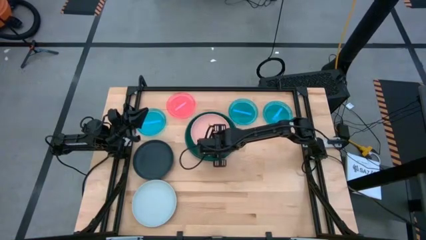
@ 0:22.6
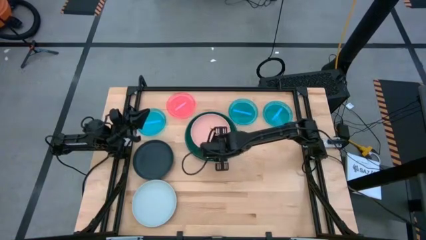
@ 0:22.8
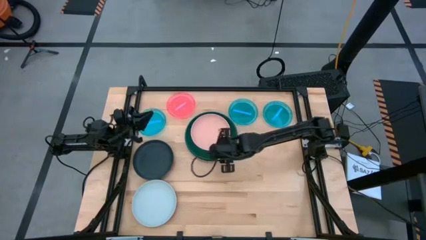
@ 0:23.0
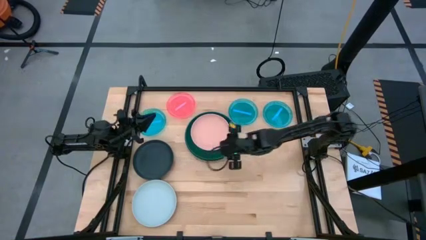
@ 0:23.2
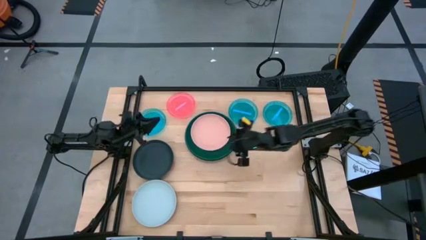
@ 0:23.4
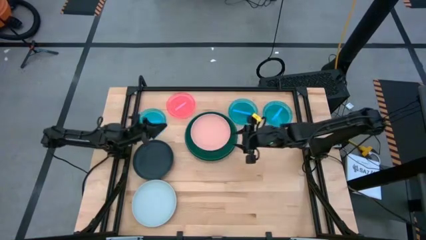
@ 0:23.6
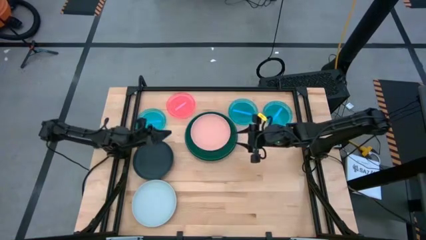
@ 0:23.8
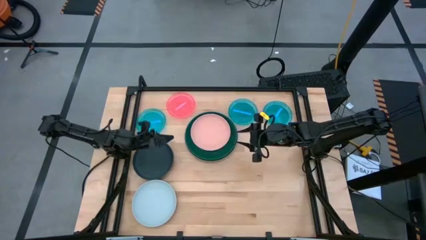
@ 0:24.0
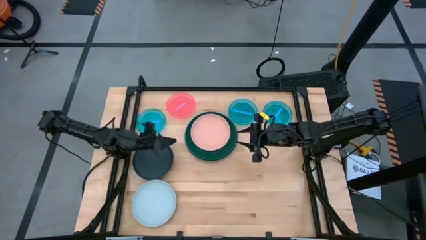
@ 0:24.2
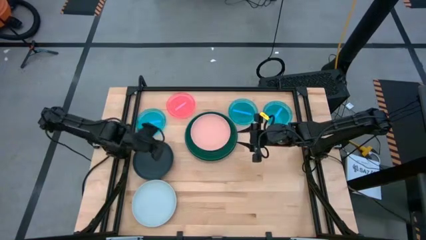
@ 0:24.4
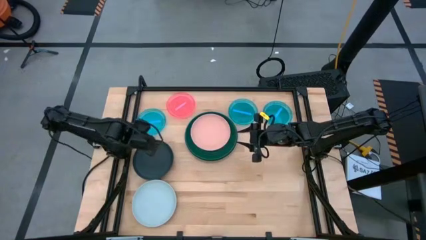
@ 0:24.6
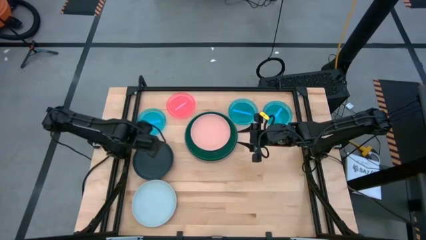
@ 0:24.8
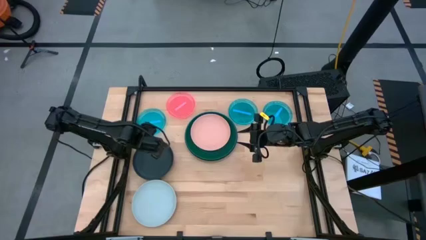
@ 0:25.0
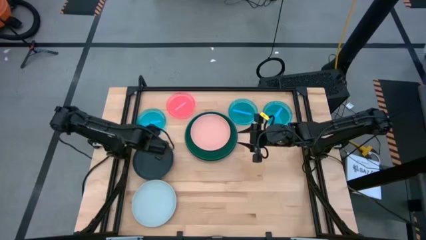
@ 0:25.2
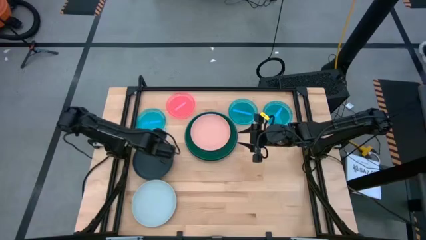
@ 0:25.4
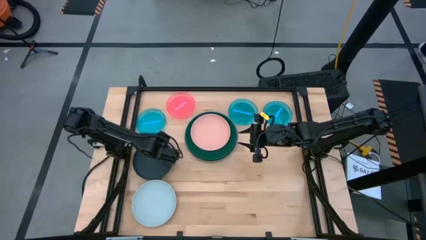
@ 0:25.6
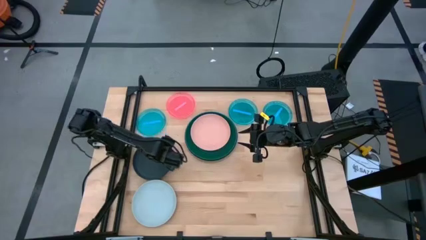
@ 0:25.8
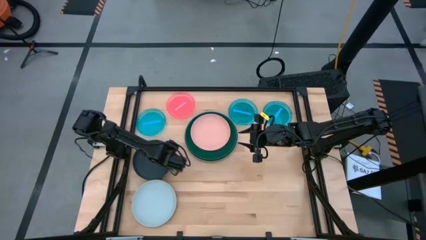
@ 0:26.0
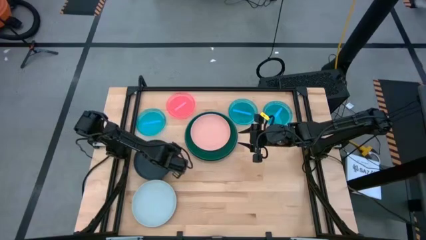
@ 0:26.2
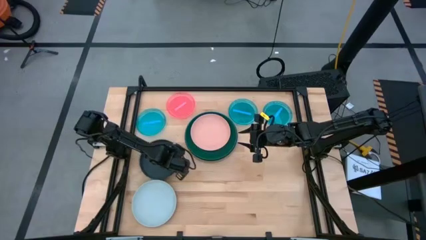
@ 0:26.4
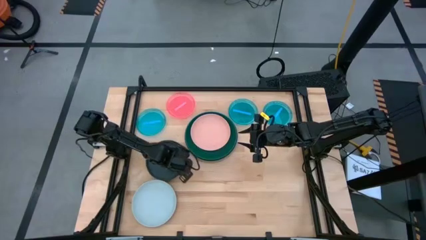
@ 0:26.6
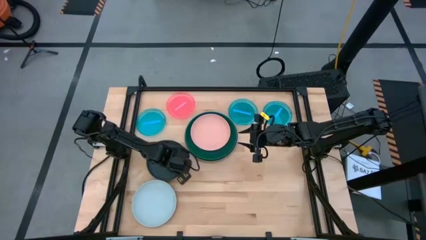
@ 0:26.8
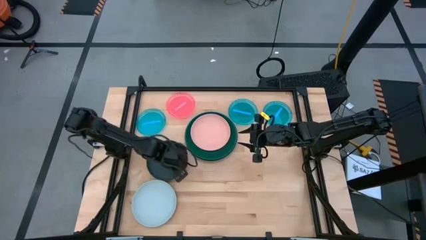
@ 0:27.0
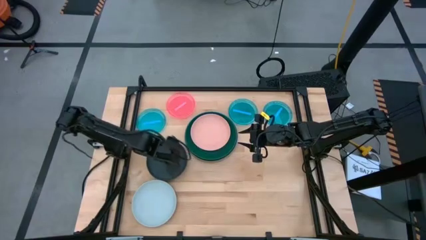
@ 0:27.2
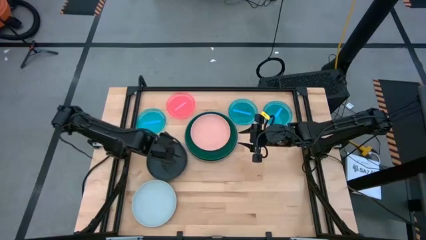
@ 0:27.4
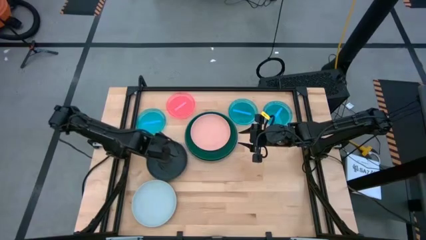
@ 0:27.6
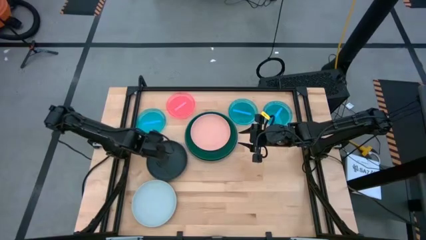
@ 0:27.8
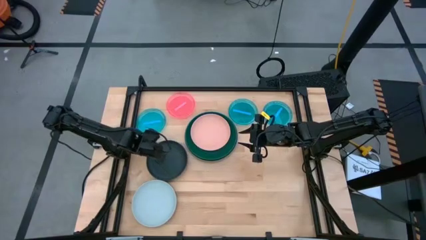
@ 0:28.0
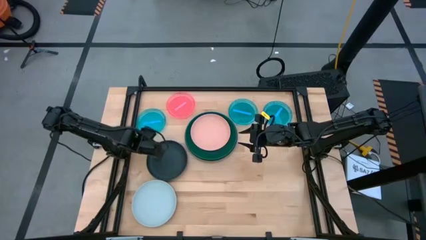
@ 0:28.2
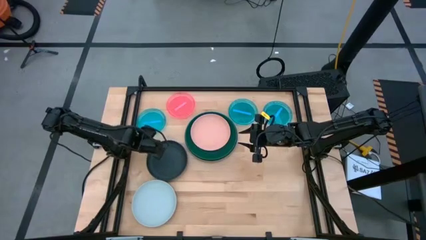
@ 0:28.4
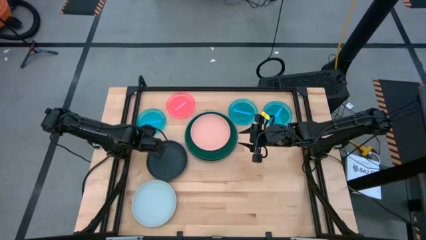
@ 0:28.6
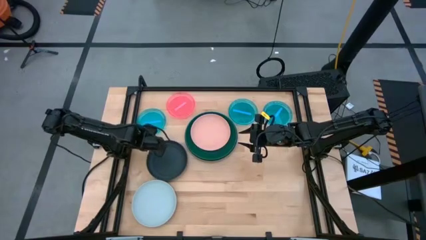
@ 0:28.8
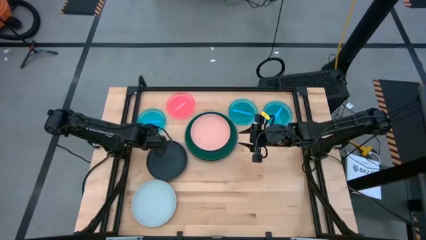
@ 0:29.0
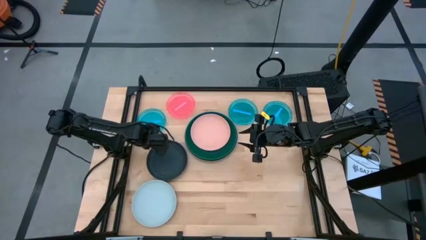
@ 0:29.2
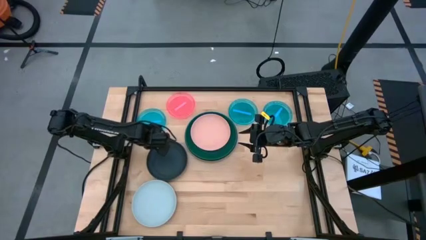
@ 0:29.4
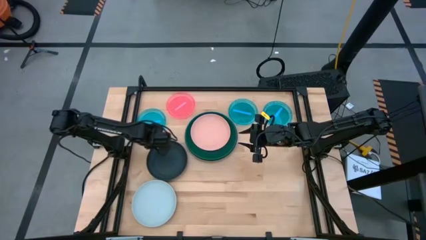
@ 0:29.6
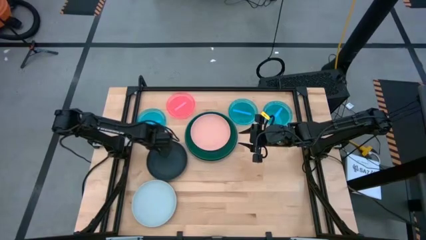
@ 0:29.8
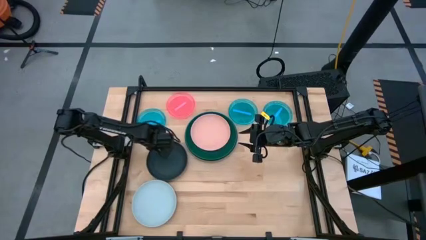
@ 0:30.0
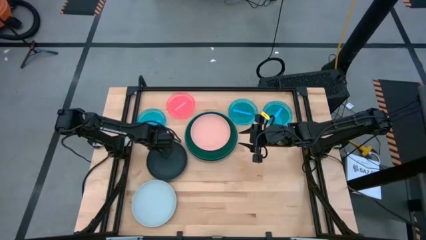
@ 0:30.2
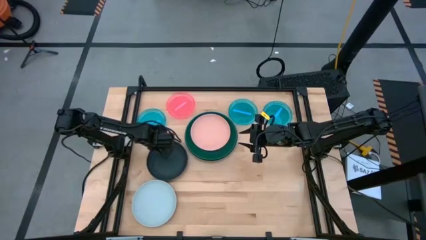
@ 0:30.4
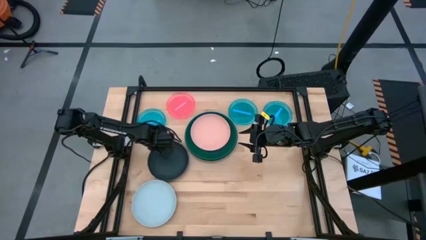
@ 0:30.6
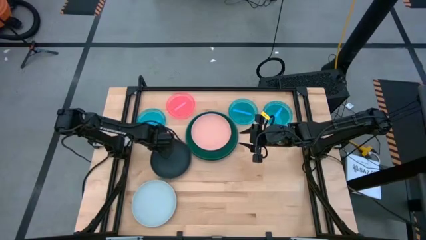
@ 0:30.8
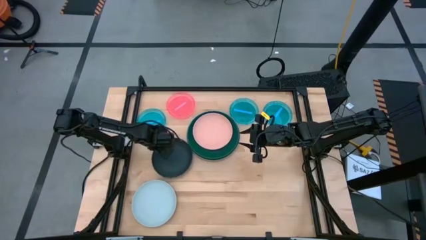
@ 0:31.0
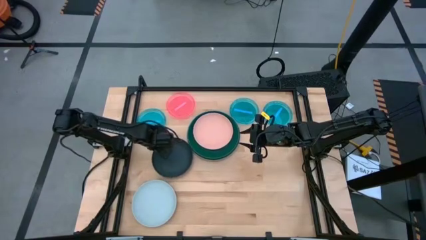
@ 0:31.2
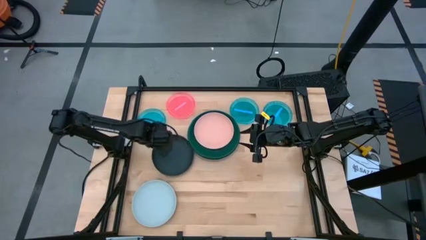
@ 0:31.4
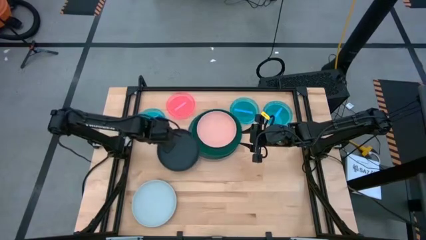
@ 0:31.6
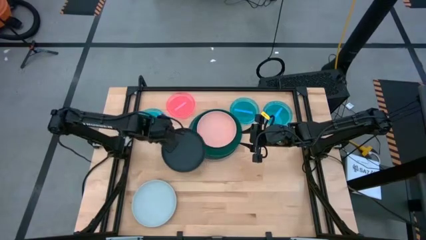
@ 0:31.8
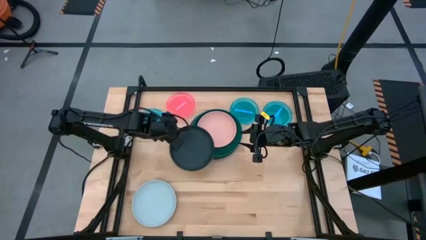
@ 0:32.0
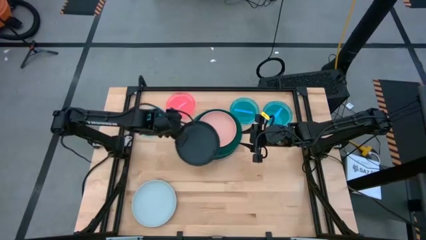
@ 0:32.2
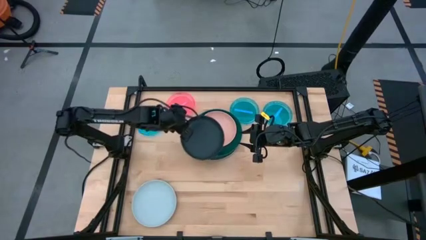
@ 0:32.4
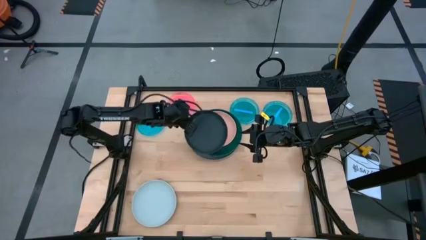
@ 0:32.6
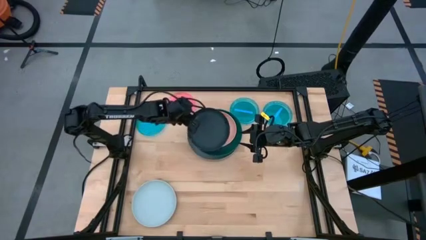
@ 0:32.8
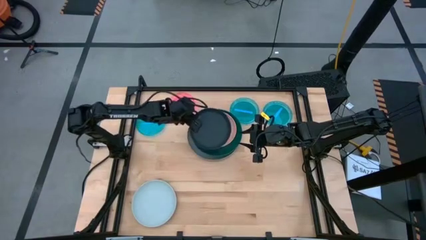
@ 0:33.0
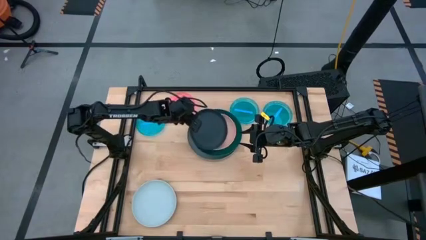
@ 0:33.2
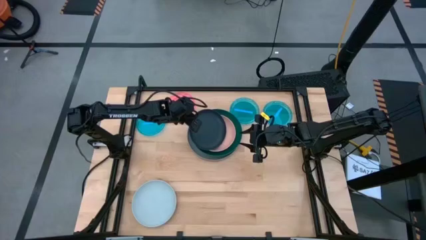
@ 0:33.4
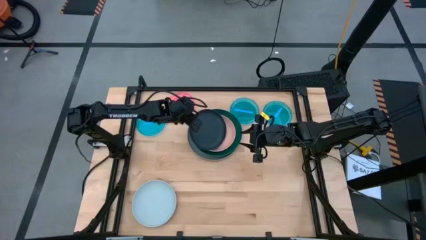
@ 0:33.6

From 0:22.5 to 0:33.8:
Task: Stack plastic plates
Stack the black plate on top of the pink plate

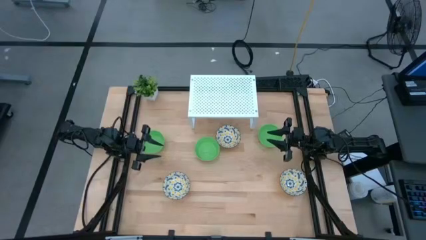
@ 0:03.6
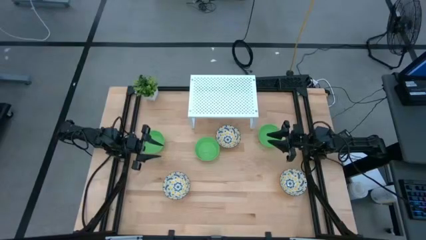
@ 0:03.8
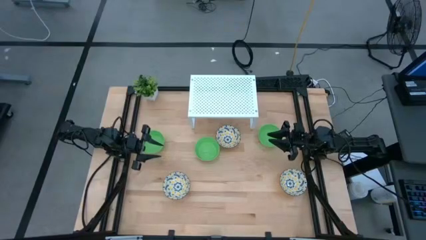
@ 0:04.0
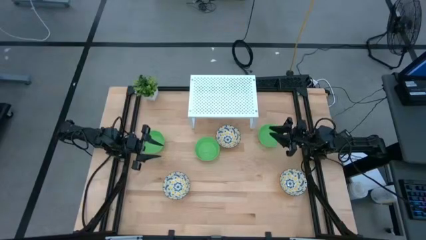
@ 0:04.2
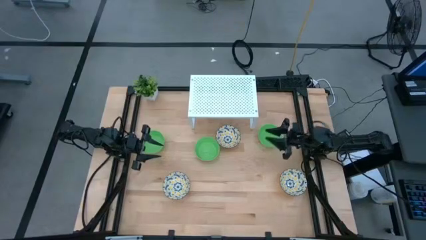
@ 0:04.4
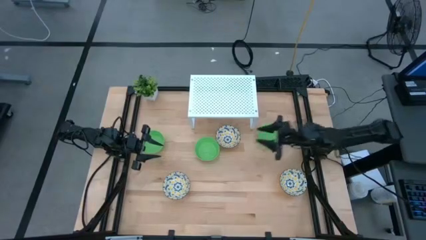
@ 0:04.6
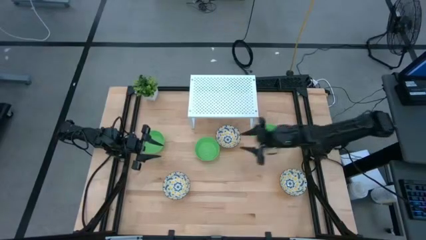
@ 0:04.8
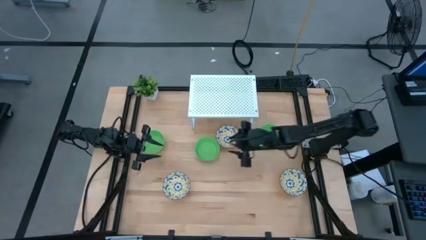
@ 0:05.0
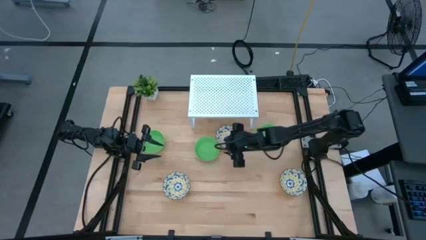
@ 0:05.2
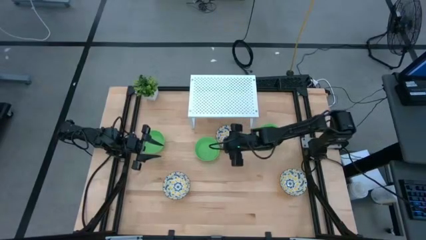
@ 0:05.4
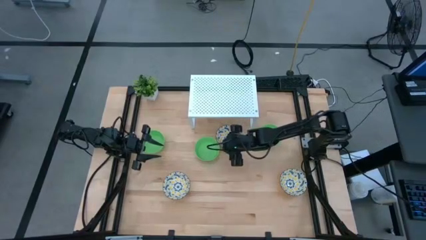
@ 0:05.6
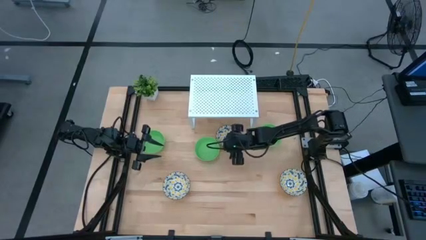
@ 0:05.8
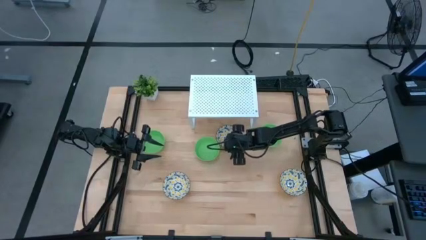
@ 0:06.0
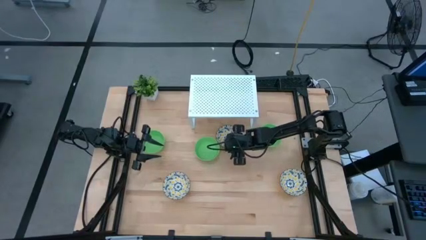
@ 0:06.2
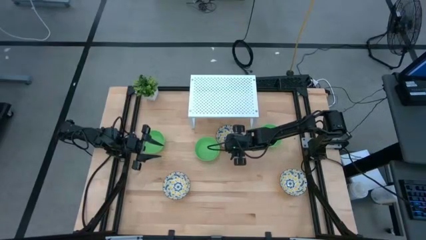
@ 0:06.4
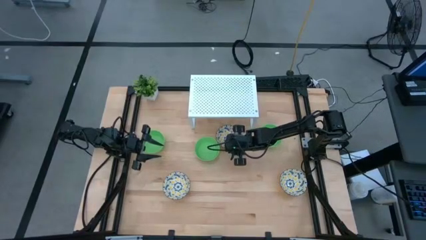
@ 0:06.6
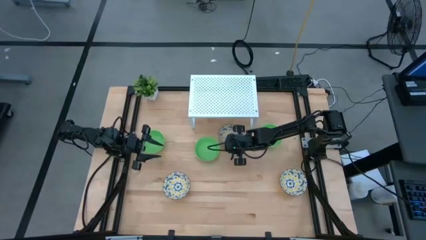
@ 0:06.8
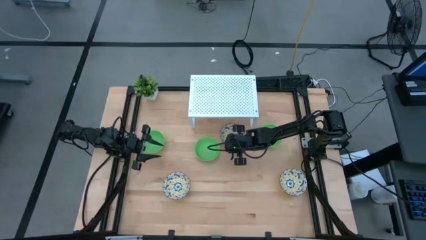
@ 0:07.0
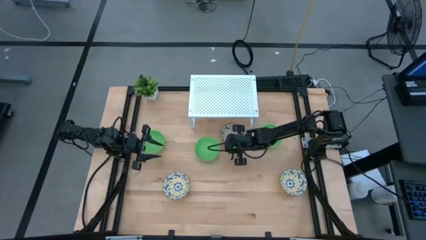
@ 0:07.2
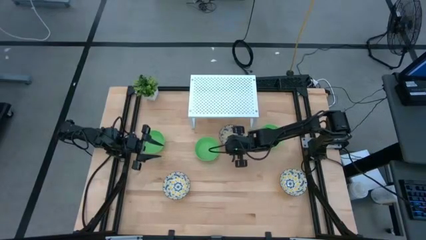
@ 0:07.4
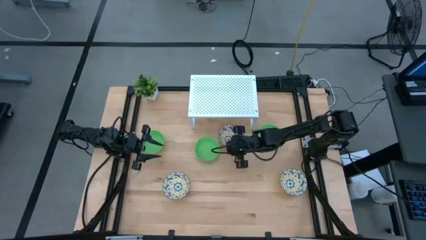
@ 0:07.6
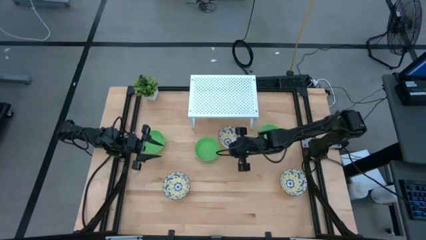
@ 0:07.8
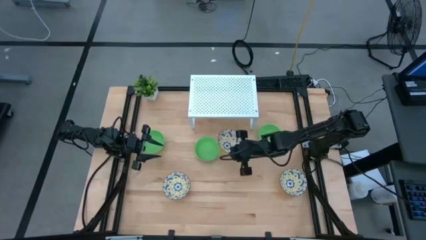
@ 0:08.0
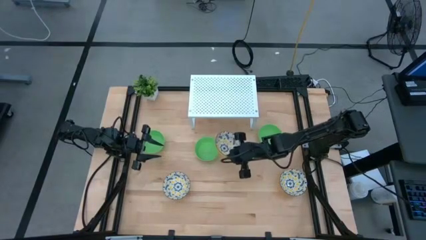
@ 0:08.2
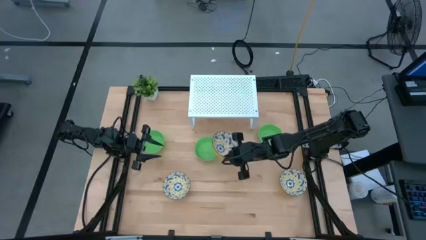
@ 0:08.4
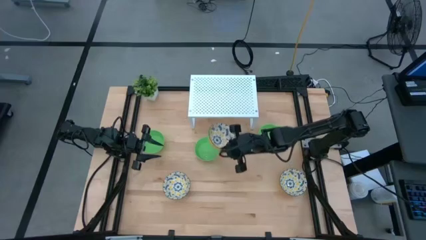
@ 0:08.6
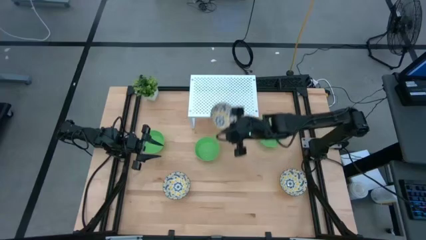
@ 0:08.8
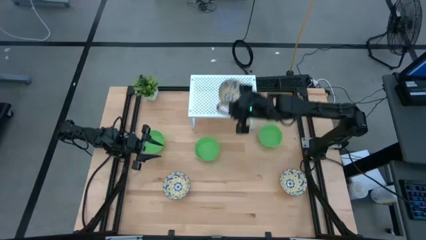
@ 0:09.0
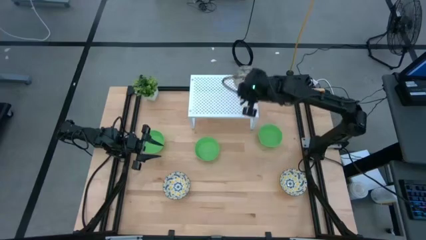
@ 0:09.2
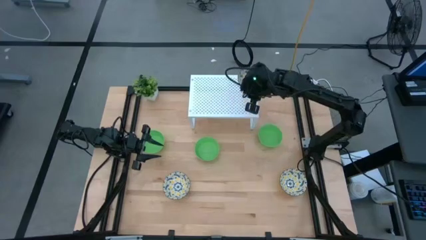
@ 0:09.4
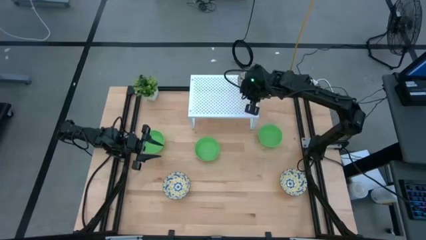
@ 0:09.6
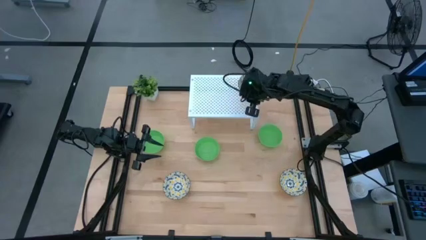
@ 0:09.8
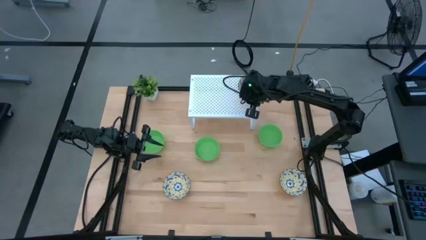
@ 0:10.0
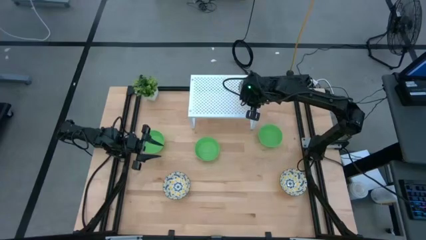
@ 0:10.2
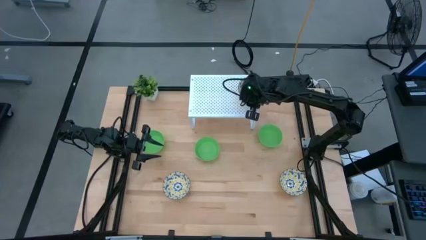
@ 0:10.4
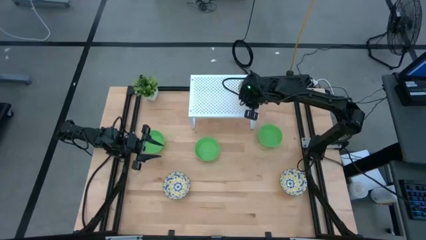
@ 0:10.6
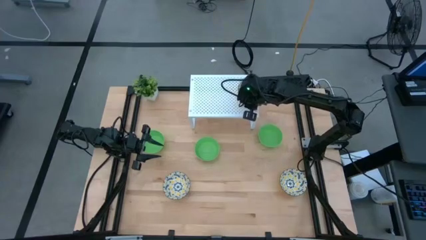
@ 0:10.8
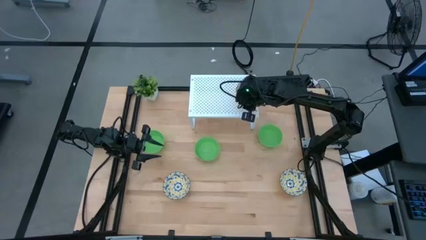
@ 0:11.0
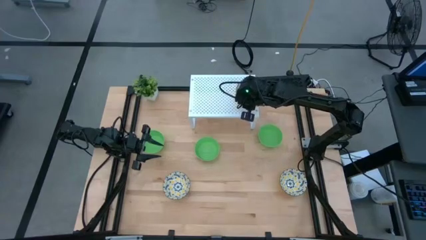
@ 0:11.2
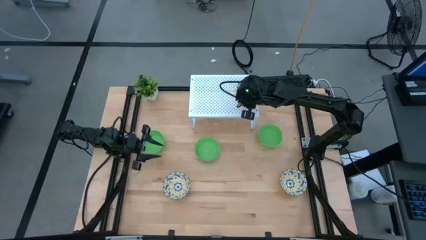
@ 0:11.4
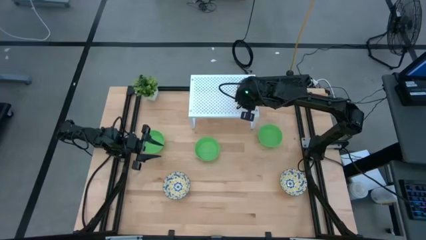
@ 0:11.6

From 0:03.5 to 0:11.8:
Task: Pick & Place Mini bowls
Put the top blue and yellow patterned bowl on the shelf
